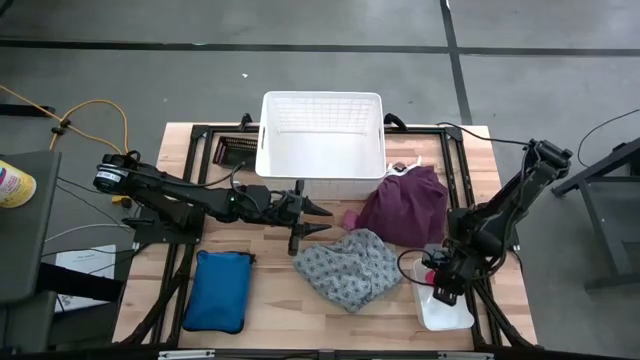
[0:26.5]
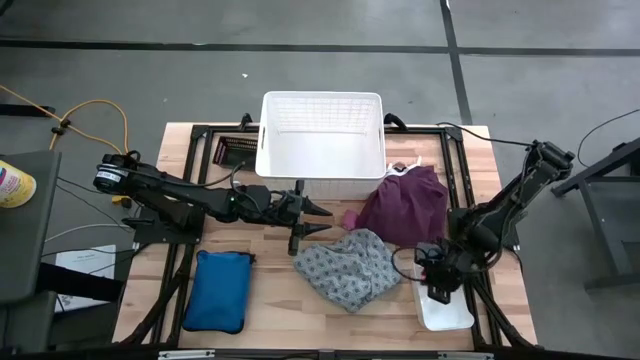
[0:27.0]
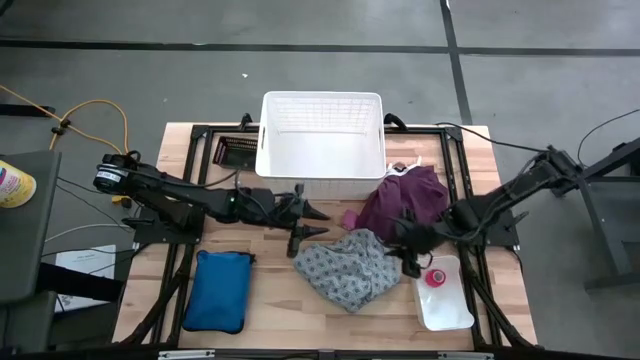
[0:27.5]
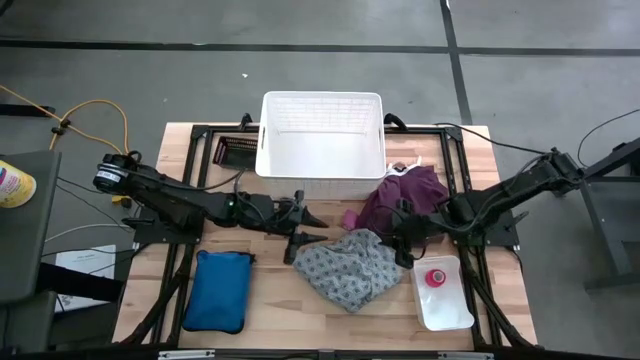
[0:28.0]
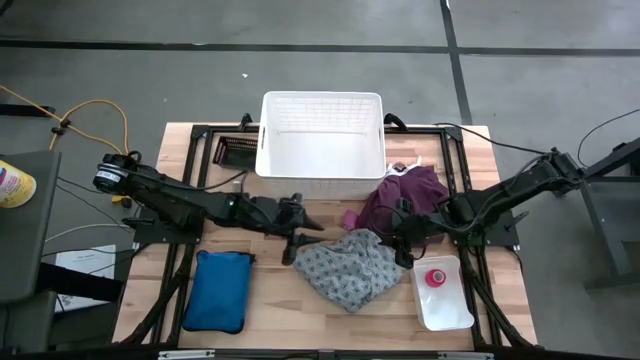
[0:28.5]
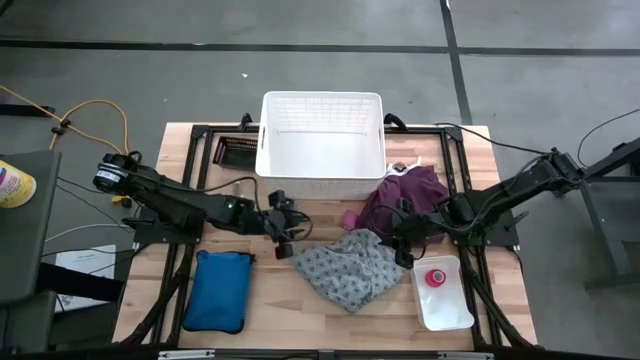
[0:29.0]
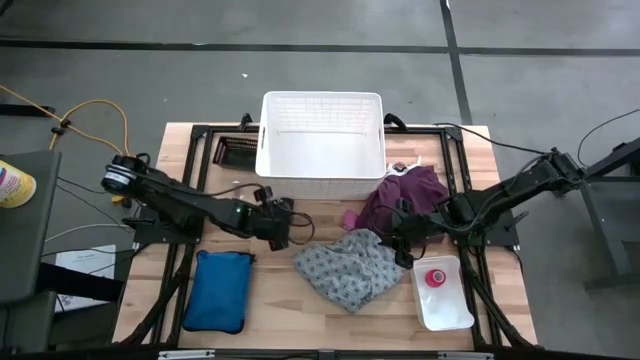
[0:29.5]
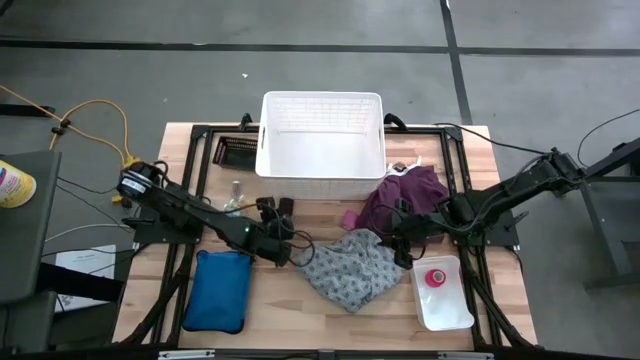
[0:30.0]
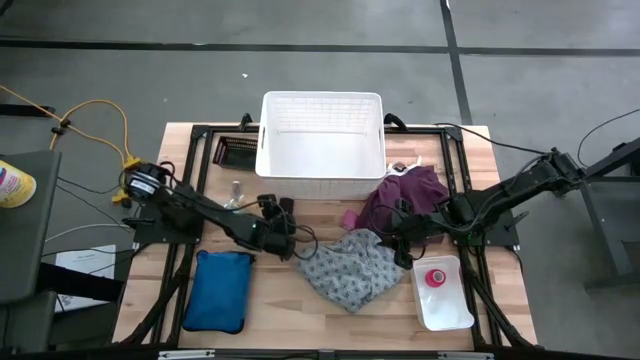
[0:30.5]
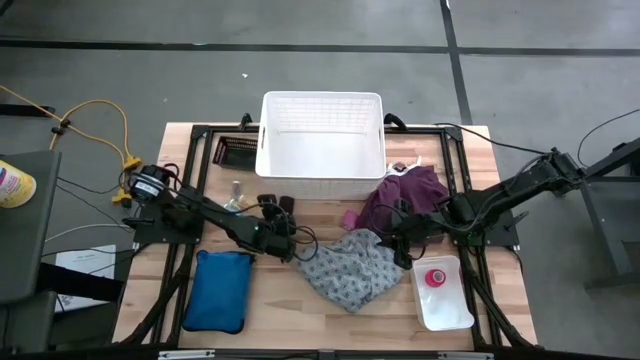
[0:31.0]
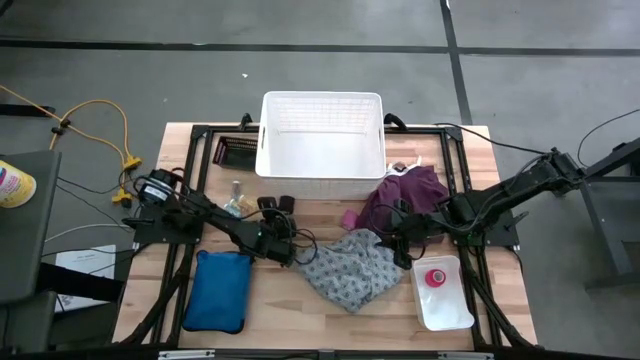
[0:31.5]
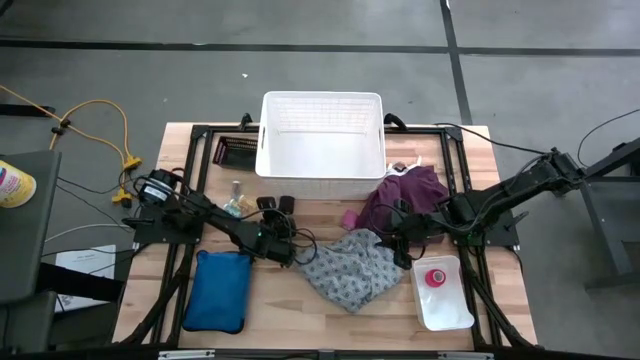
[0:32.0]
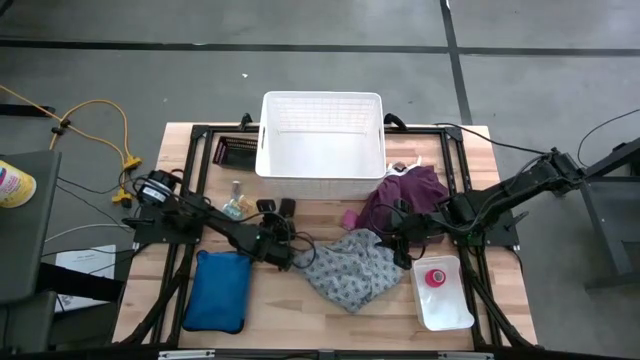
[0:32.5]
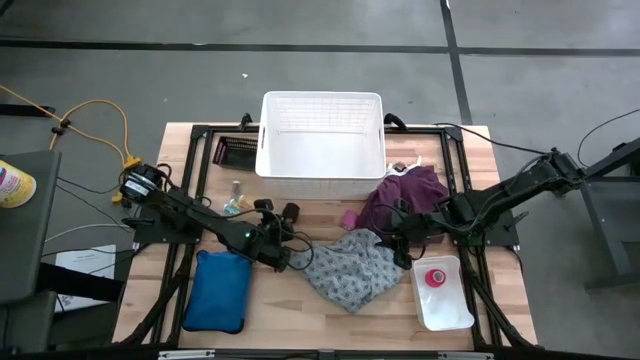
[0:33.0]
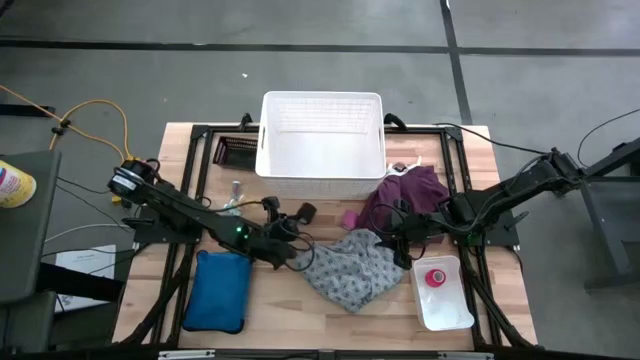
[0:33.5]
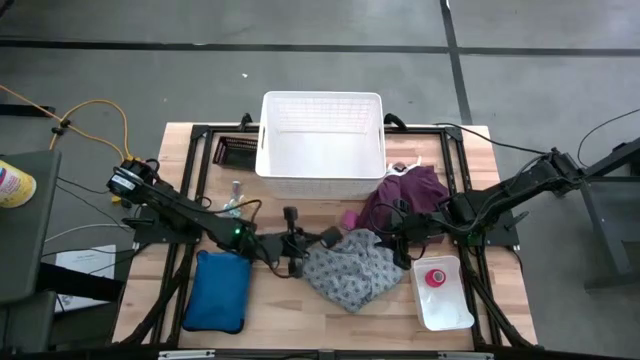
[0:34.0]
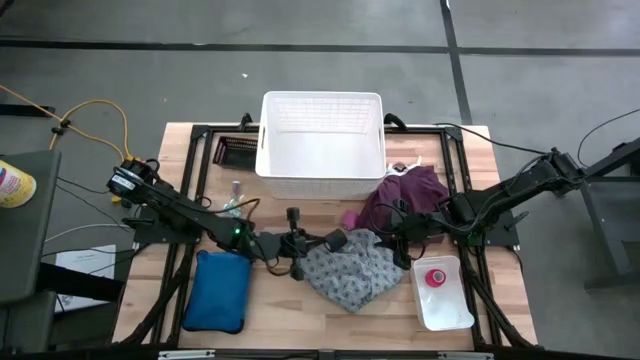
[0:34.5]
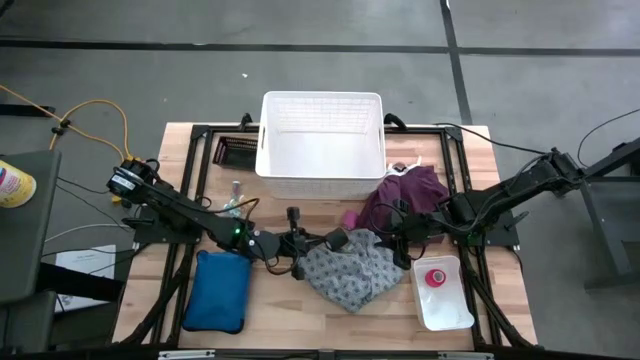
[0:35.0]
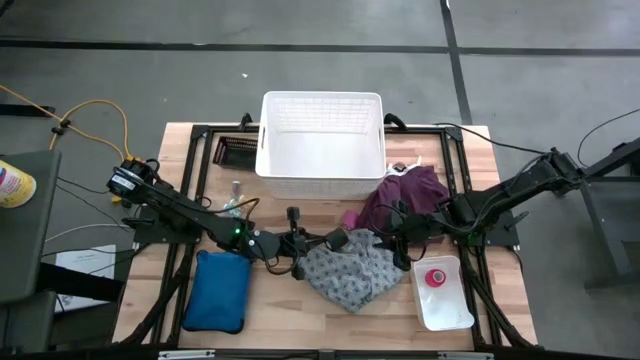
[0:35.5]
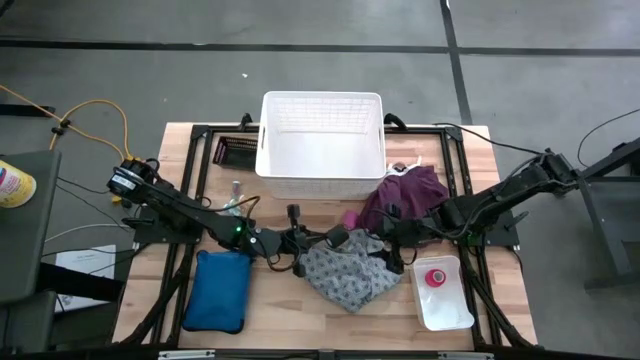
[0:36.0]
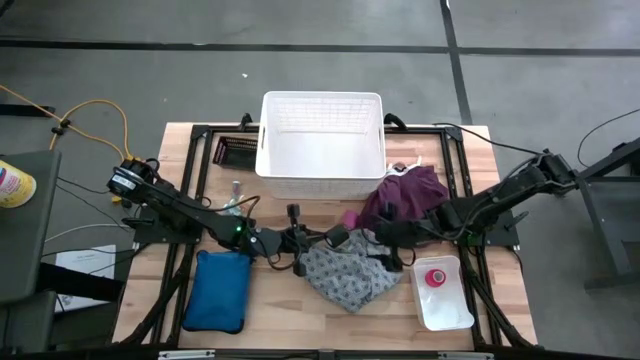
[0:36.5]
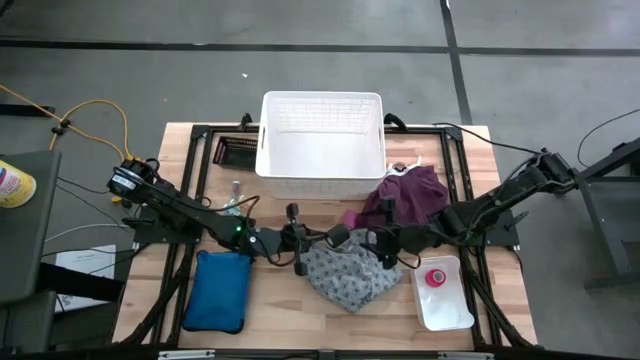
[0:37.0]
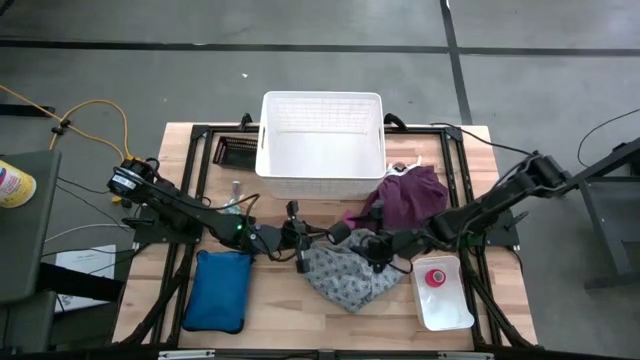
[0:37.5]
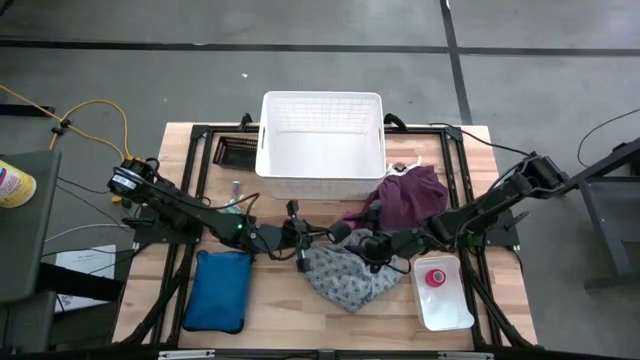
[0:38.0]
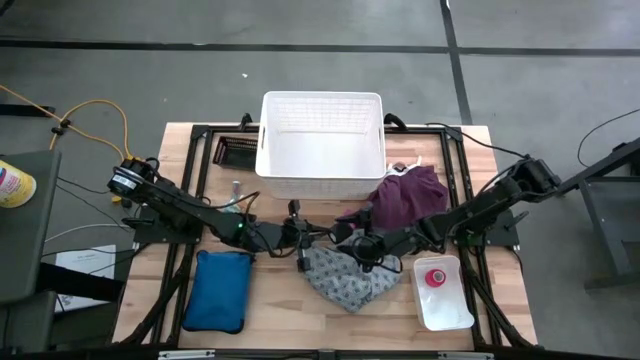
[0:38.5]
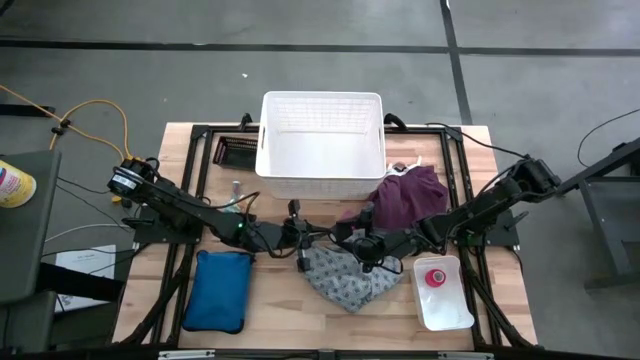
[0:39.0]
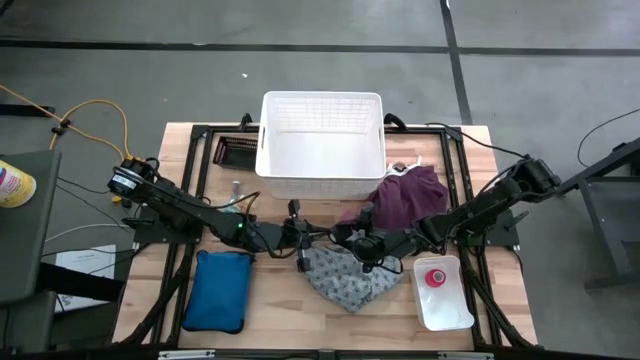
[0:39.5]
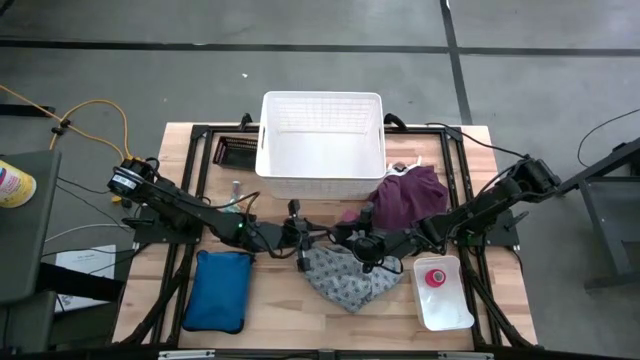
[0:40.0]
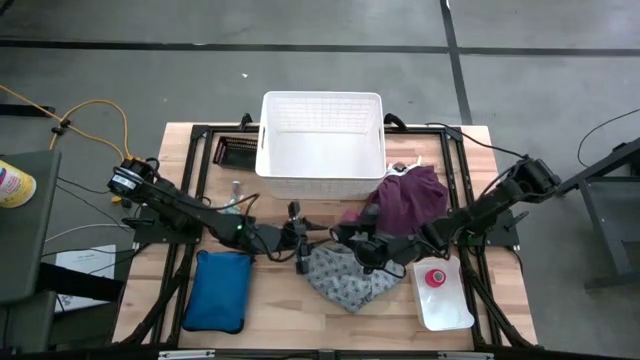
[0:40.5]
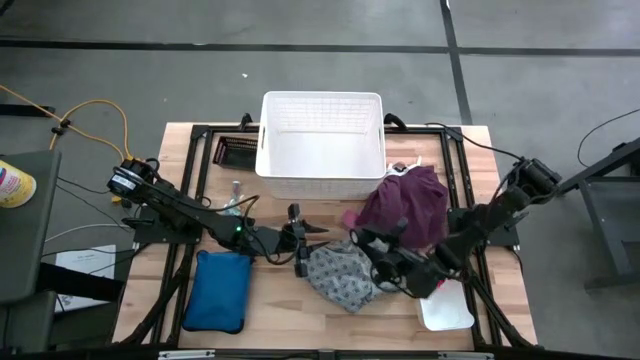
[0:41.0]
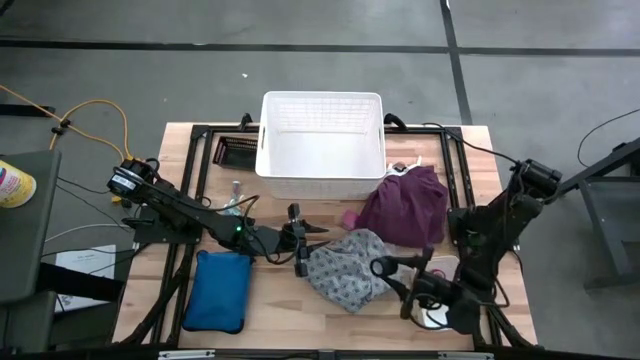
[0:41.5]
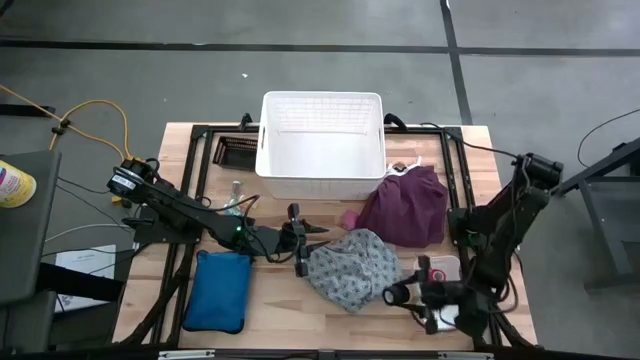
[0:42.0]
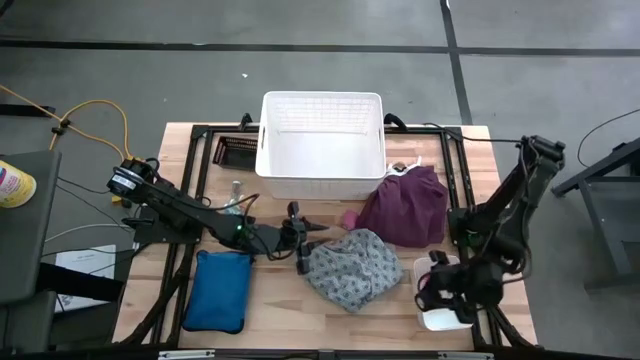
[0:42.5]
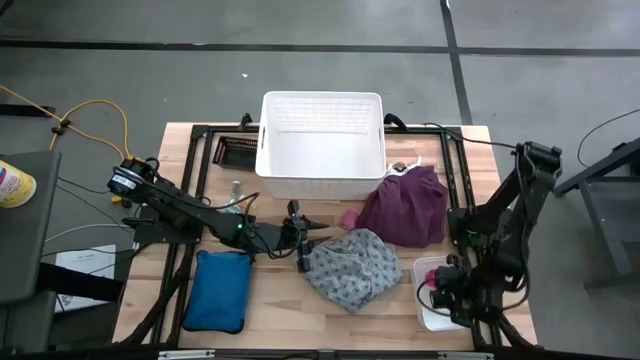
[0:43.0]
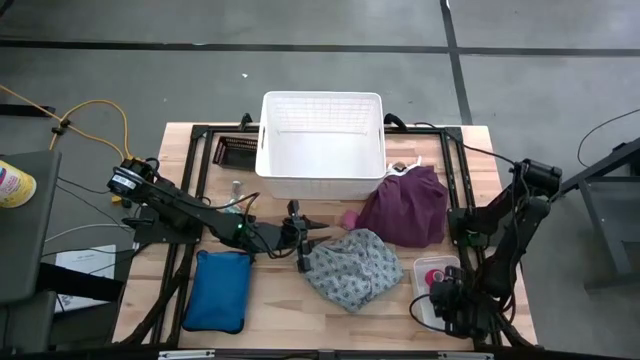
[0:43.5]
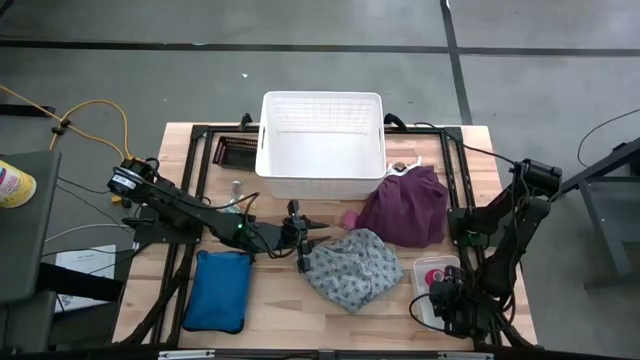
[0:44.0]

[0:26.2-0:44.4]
Task: Pick & place medical supplies in basket/bin
Put the black bandage into the small white bin
